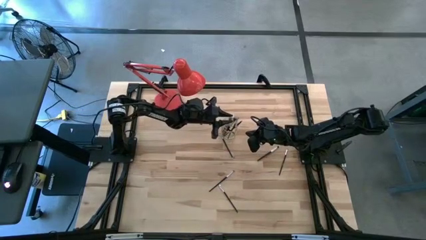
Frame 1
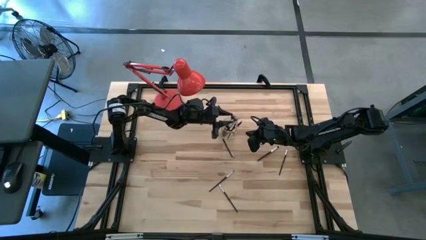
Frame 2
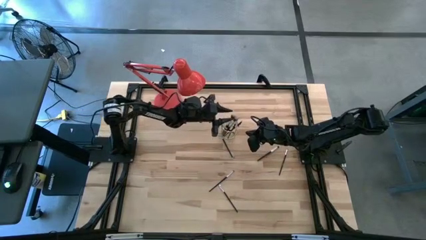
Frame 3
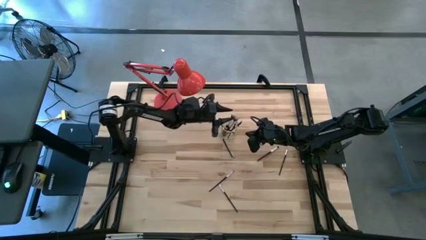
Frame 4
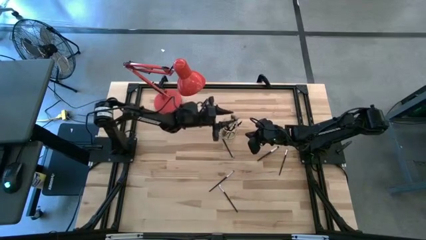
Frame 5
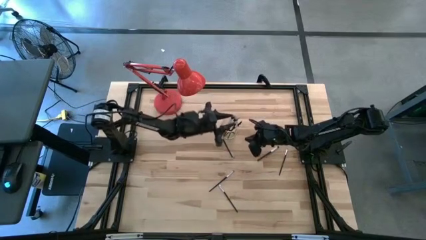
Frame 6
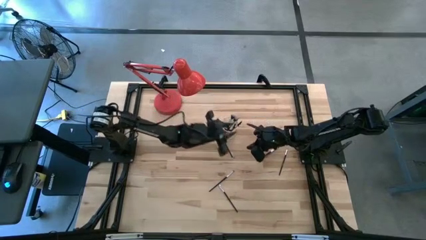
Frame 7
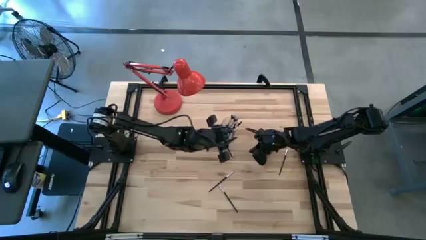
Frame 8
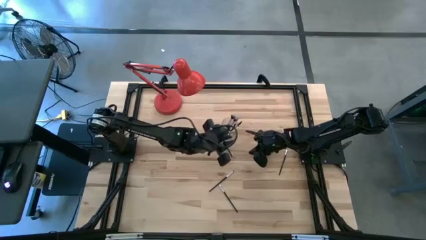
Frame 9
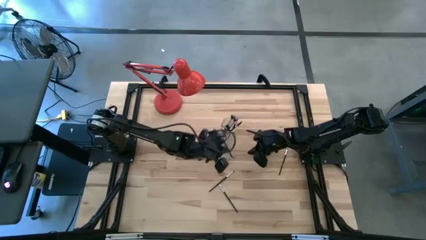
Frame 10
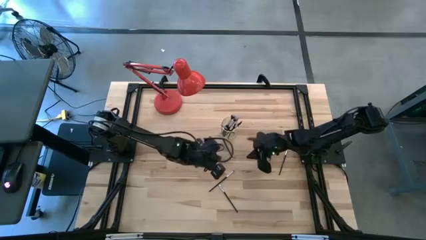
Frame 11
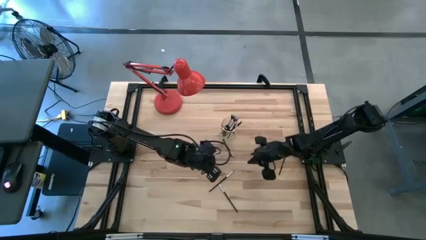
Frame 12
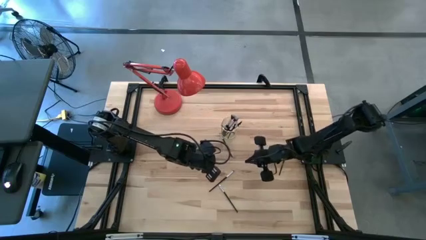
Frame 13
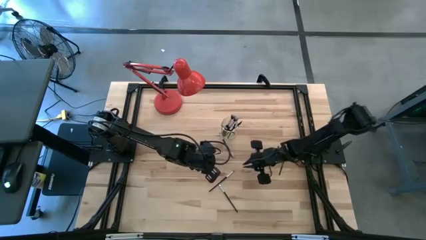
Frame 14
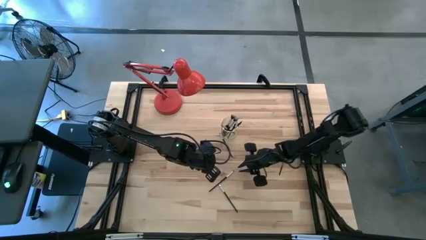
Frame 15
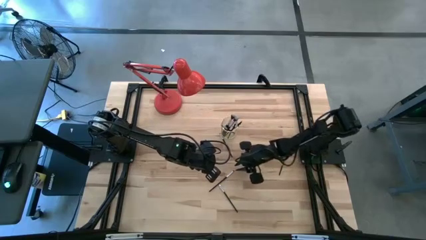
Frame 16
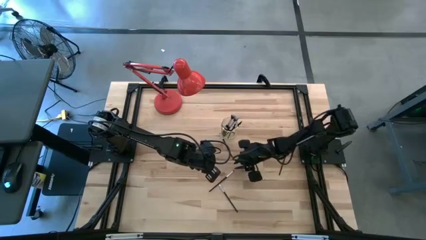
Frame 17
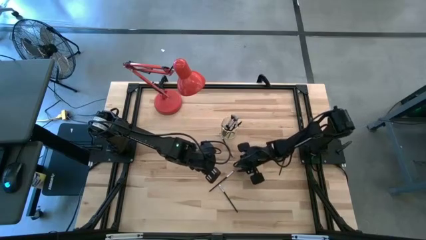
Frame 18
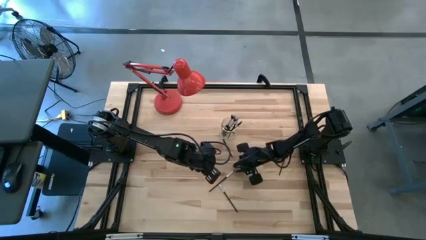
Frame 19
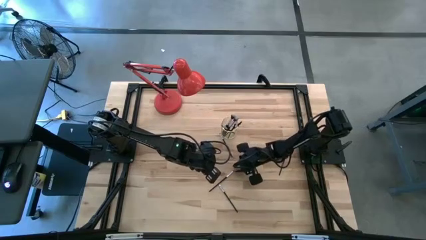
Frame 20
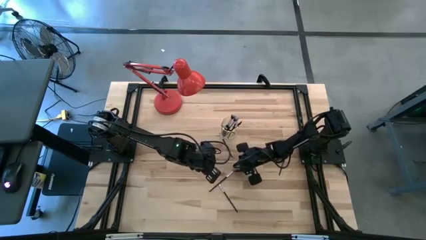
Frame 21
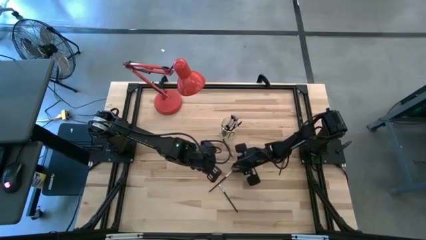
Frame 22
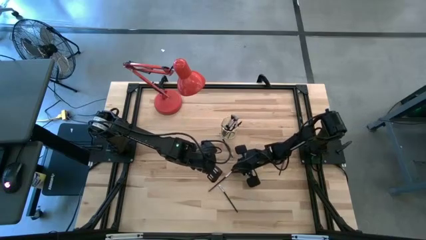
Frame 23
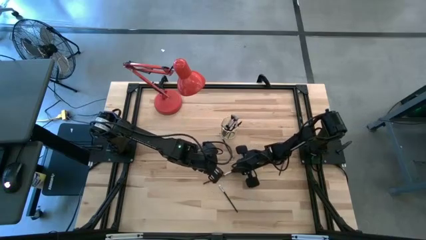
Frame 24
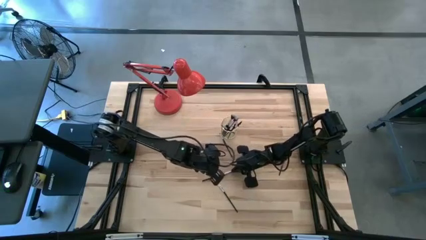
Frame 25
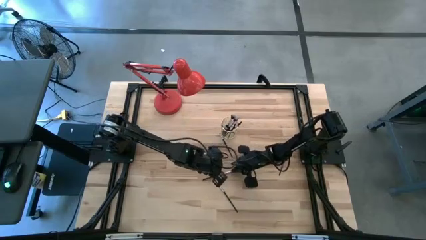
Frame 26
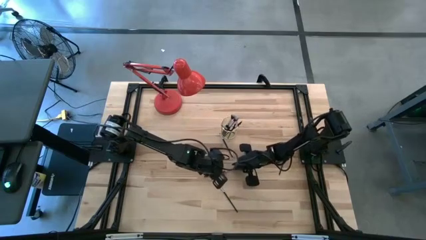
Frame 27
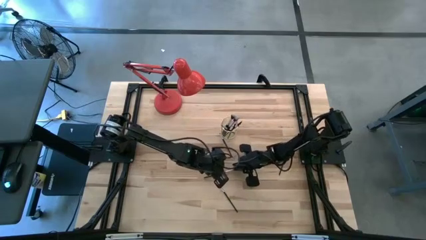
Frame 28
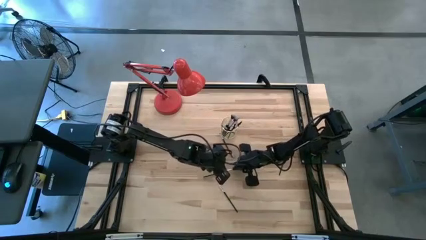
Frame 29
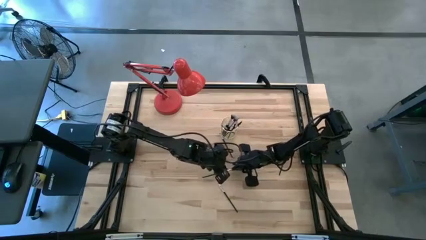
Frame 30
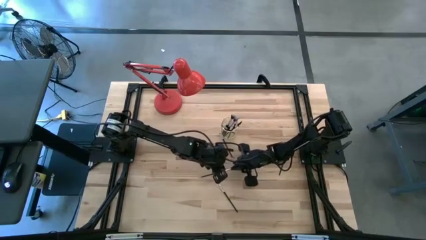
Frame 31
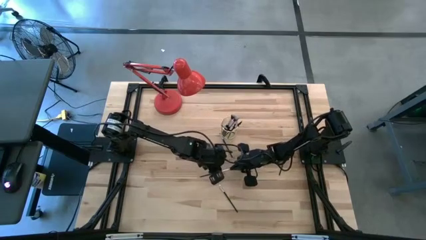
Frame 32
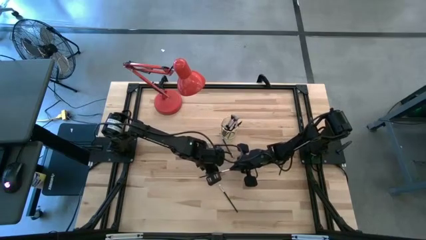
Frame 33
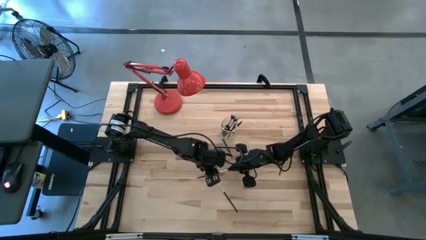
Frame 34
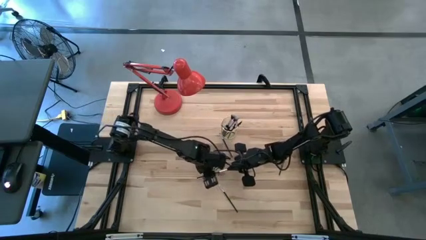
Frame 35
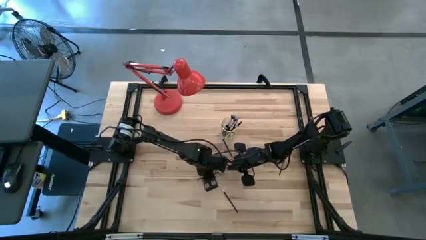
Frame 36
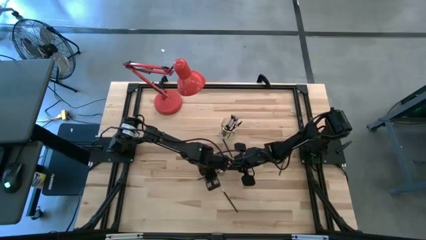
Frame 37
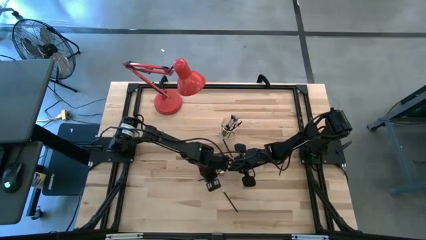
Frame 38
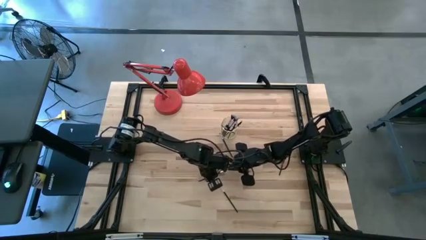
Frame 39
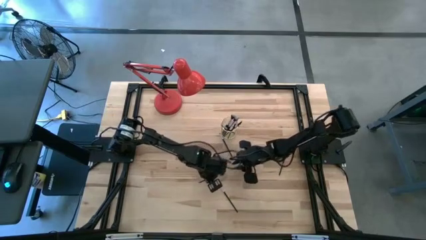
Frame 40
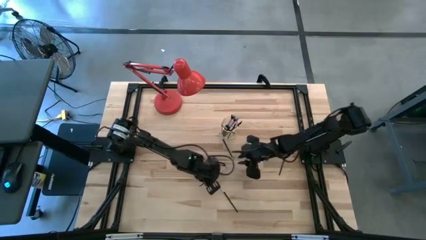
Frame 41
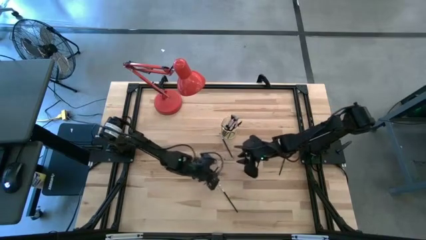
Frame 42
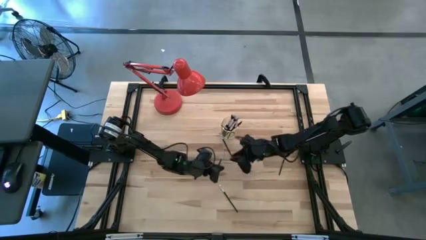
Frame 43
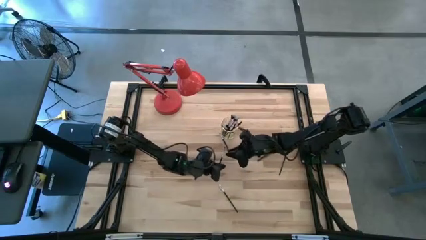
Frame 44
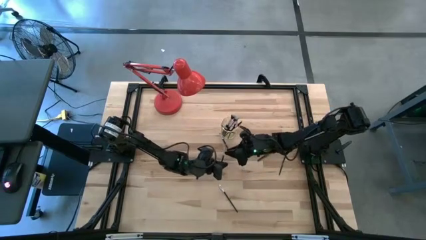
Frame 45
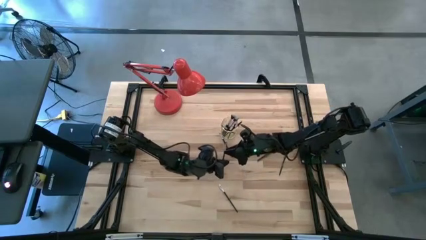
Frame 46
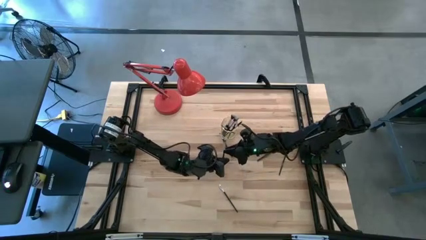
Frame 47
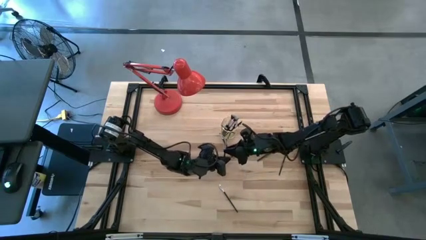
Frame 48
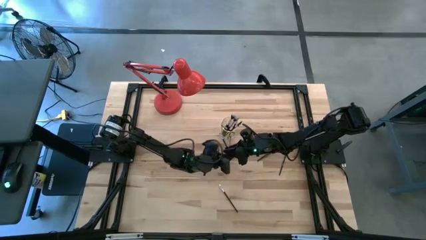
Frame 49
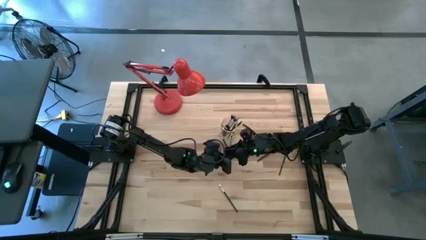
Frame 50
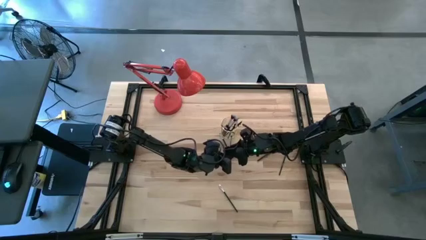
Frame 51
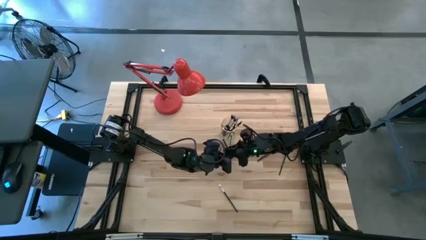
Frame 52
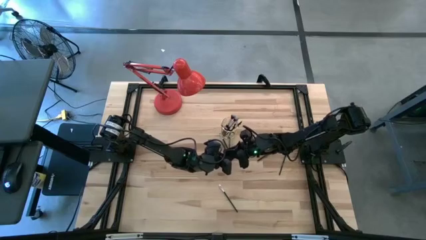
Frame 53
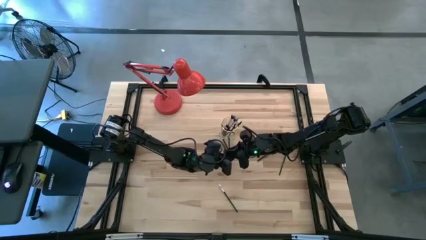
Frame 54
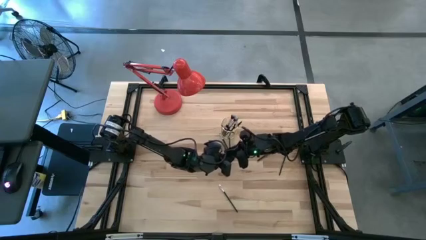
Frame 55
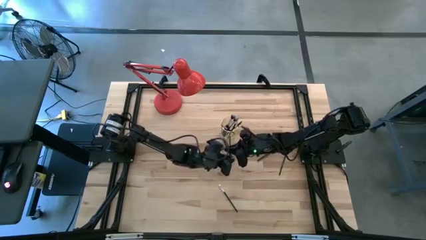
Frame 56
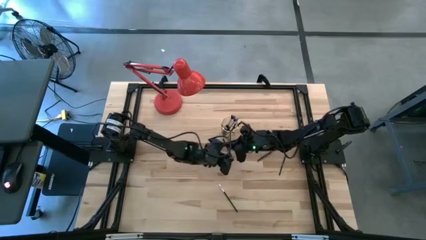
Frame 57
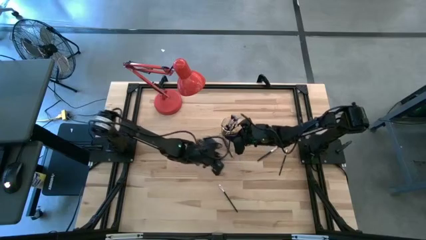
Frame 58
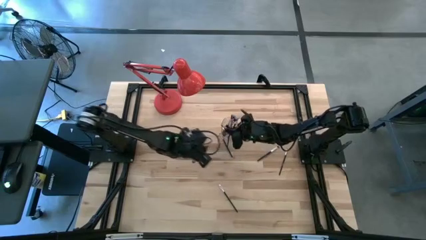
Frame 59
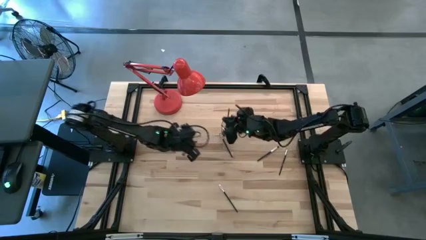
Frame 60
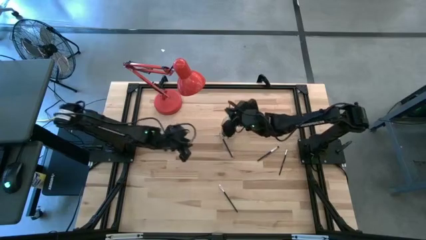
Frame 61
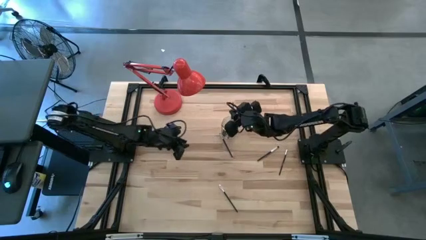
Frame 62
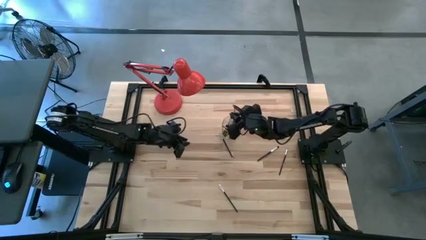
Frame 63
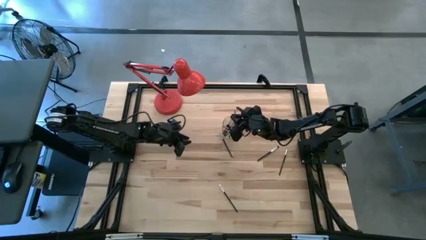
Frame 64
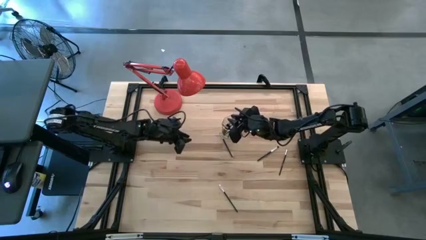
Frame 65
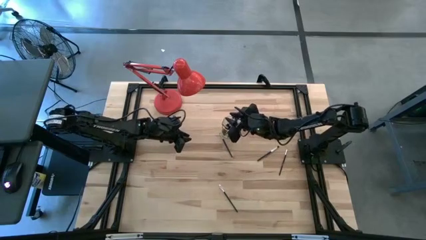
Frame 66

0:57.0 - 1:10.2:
Task: Put items in baskets/containers
Put the black eyeshadow brush into the yellow container

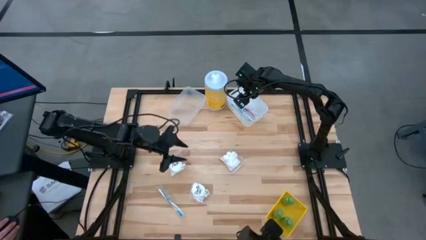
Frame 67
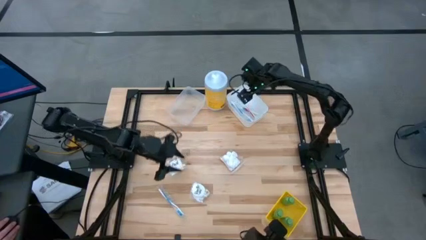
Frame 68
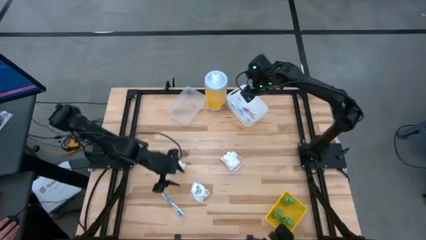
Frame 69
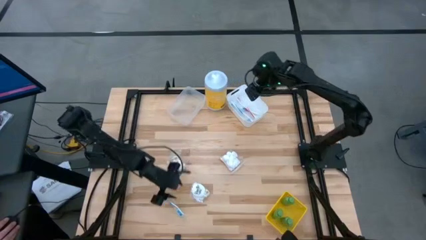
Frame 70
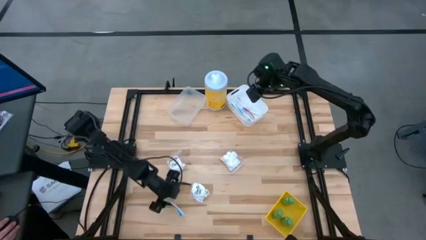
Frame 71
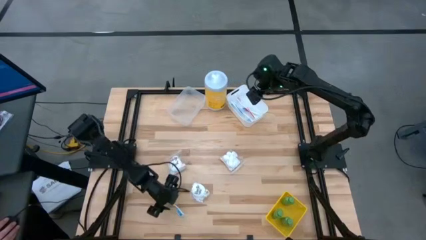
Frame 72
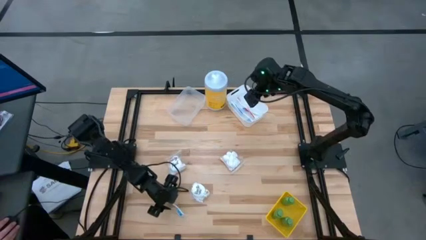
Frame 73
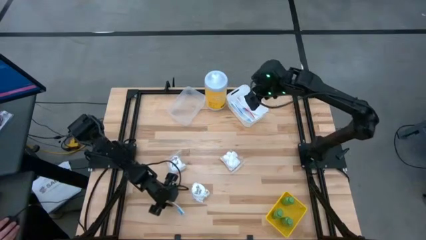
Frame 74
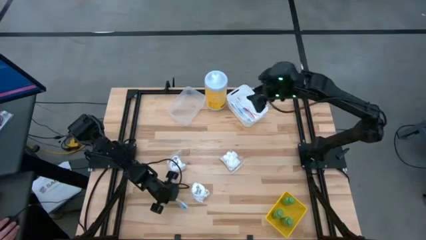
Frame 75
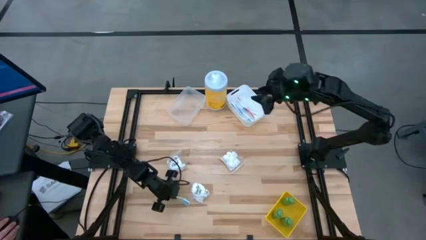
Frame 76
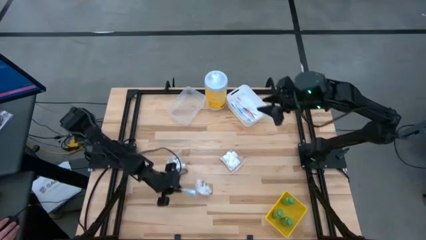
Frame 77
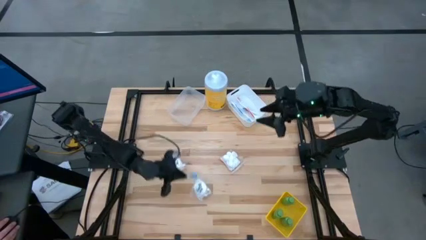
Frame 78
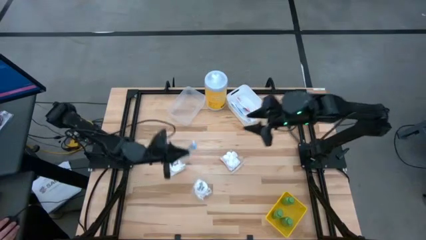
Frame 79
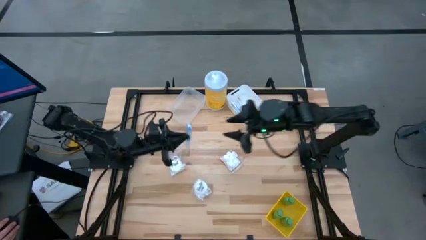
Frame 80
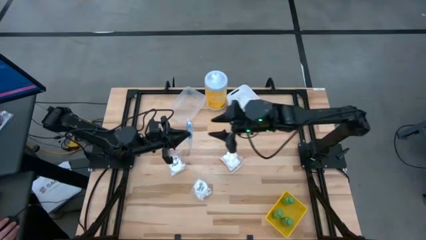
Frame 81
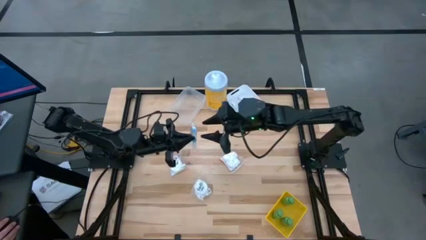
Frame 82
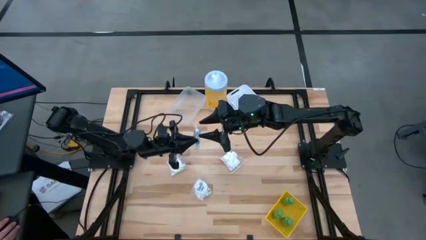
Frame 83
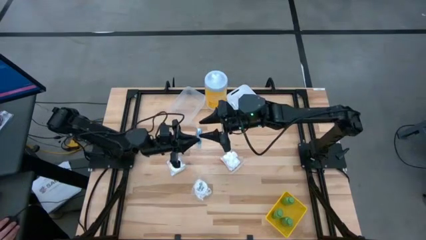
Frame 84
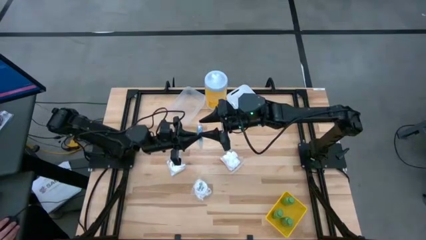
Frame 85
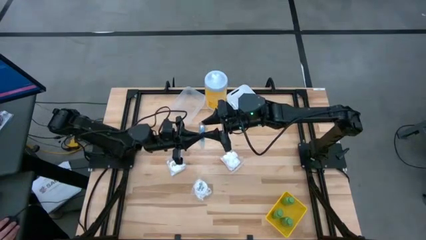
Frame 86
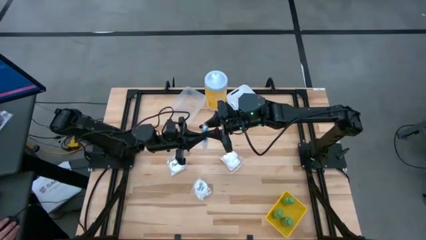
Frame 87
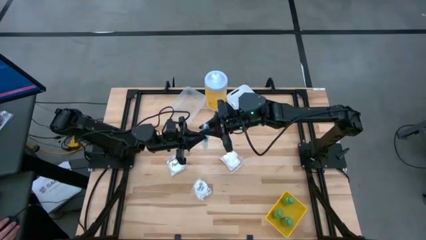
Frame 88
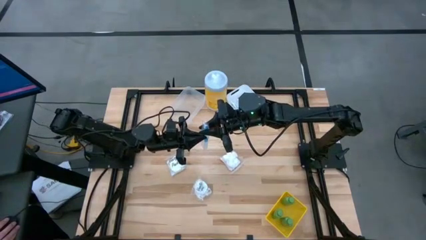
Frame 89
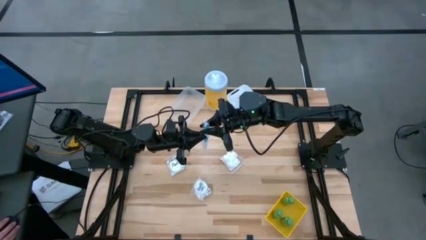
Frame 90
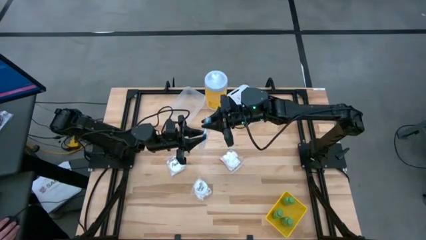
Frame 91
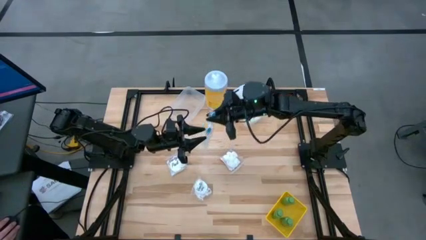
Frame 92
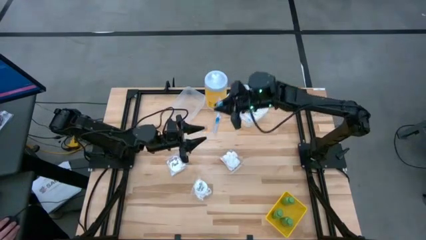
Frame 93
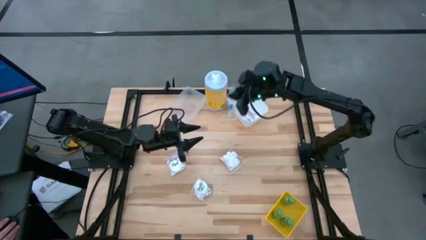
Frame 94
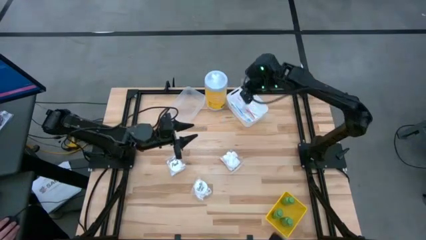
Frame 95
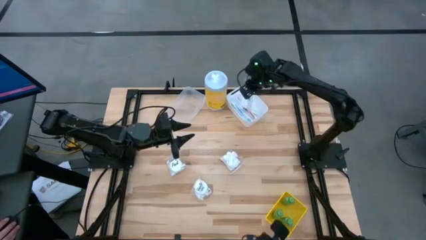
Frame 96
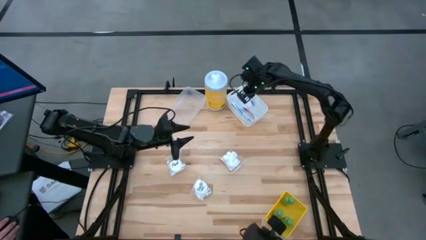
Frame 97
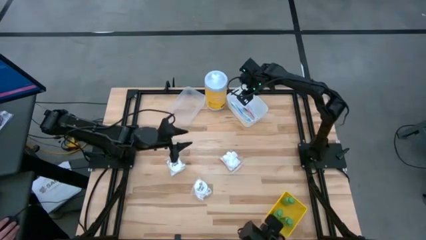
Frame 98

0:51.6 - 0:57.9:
Task: Pick & Place Travel size toiletries
Put the blue toothbrush into the white bin
